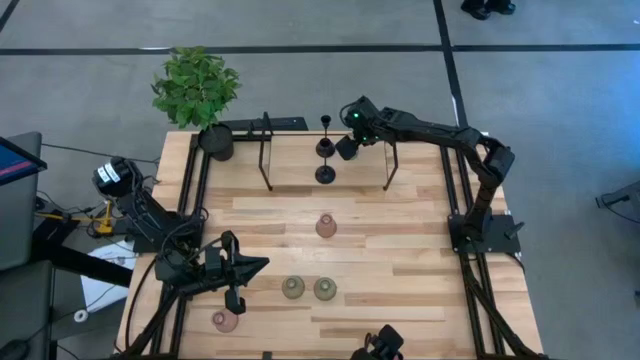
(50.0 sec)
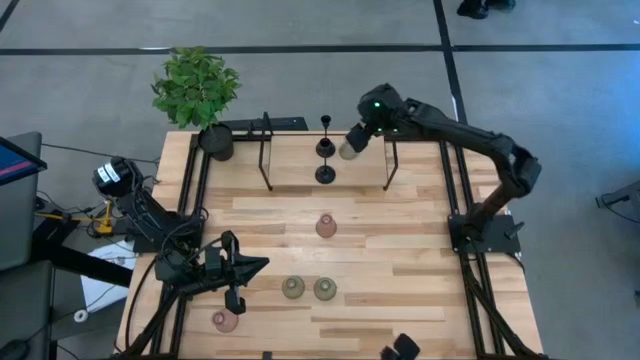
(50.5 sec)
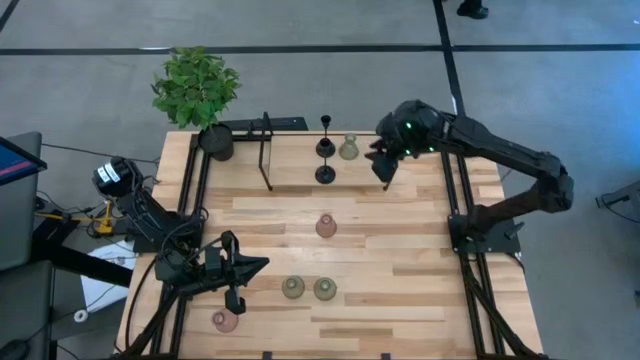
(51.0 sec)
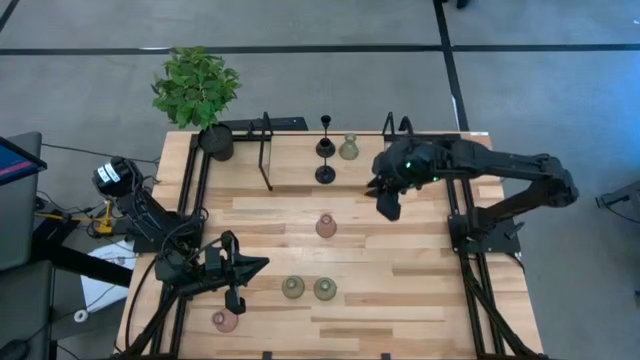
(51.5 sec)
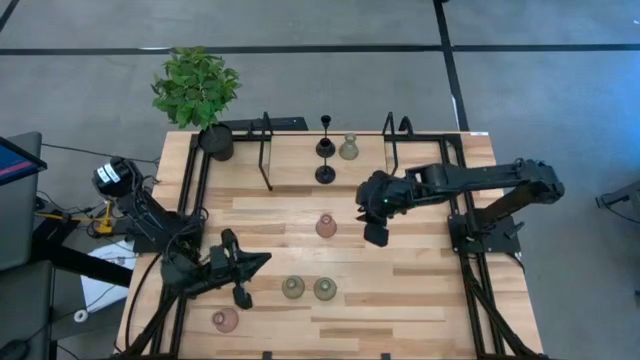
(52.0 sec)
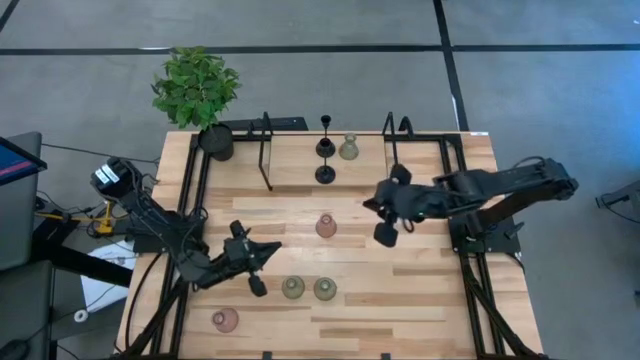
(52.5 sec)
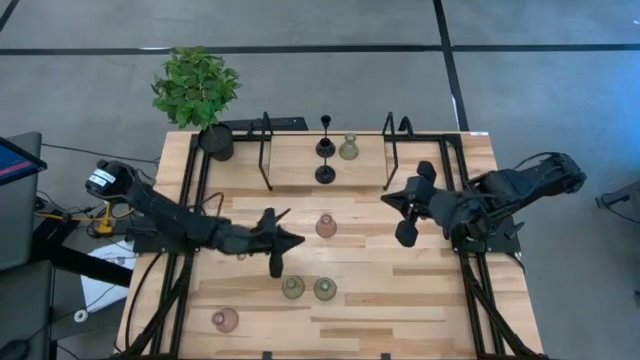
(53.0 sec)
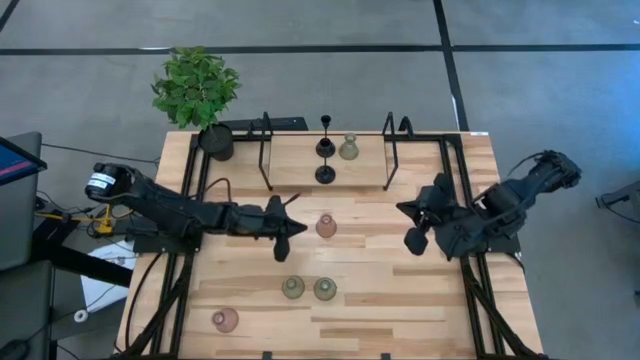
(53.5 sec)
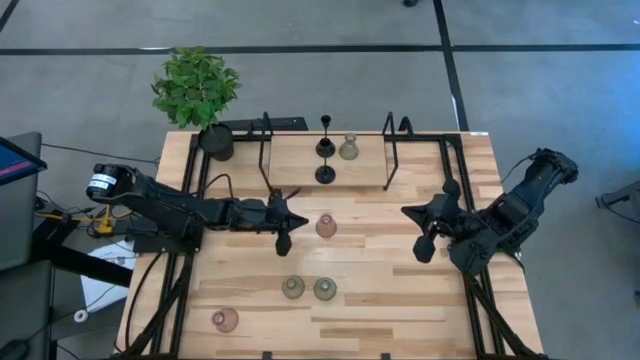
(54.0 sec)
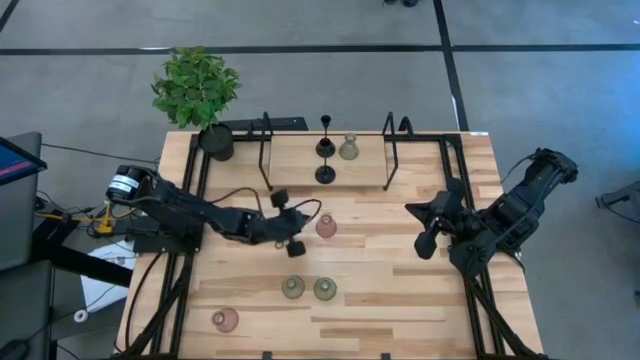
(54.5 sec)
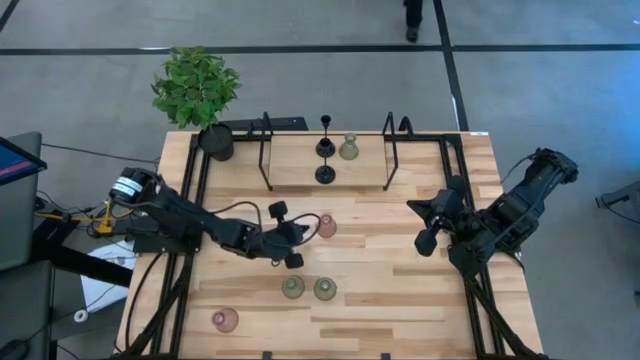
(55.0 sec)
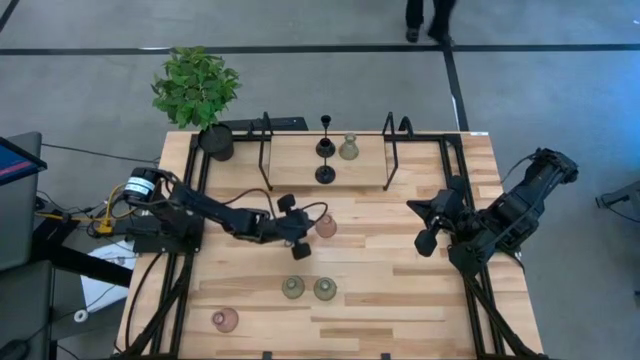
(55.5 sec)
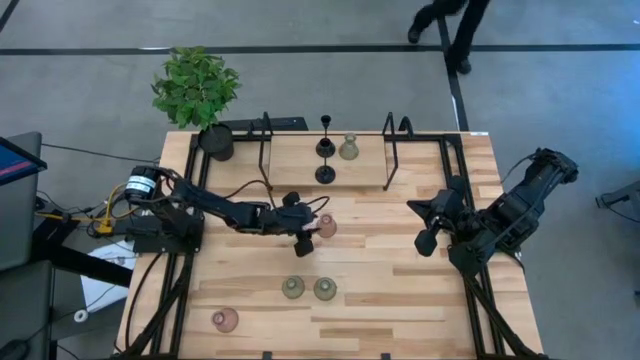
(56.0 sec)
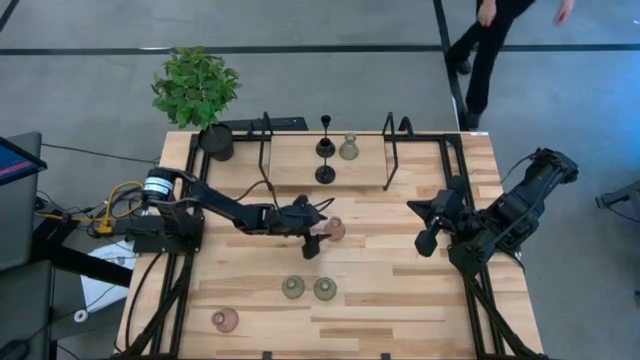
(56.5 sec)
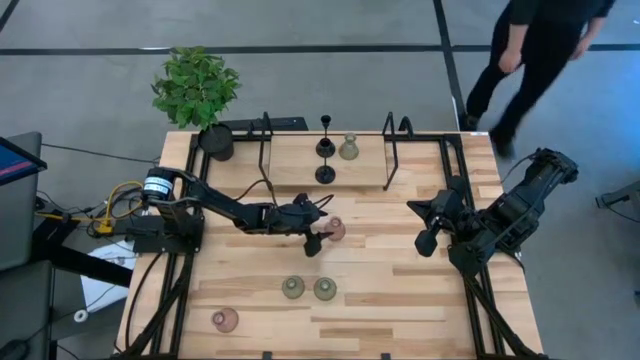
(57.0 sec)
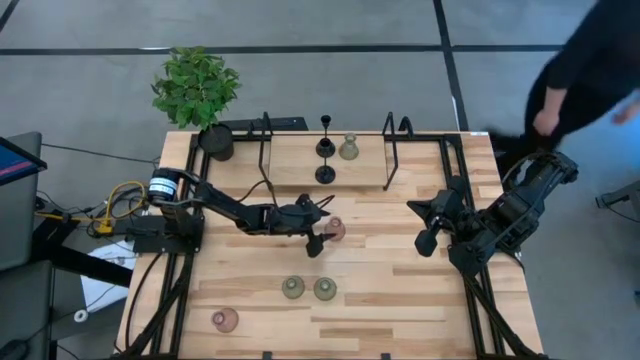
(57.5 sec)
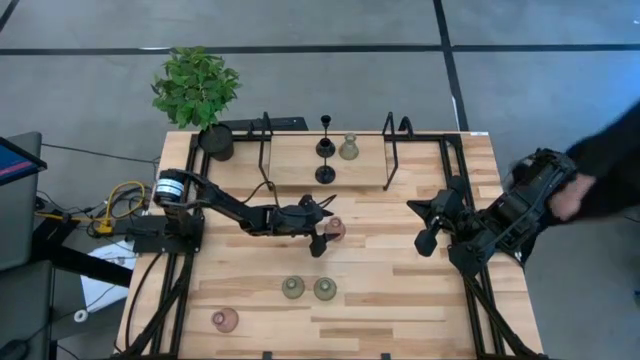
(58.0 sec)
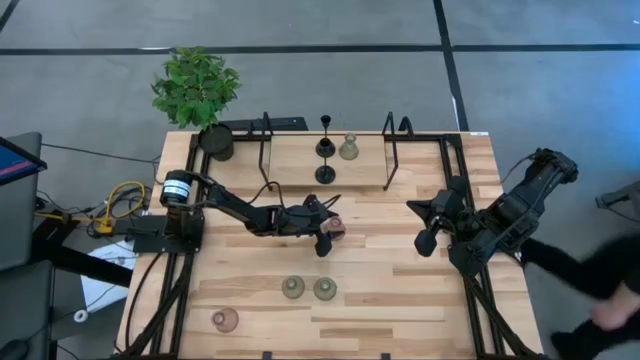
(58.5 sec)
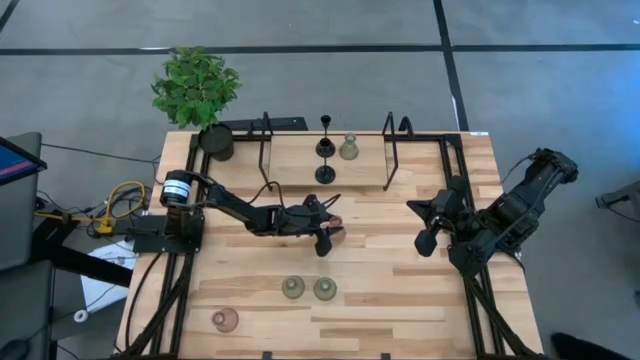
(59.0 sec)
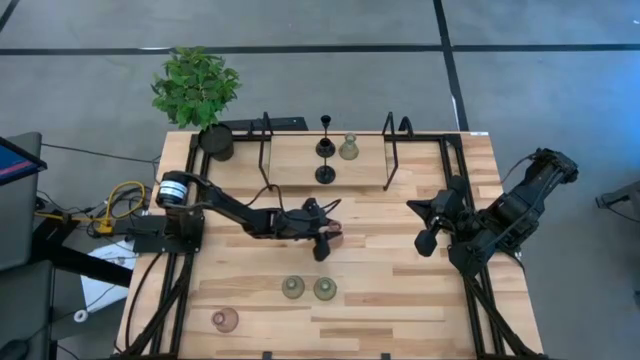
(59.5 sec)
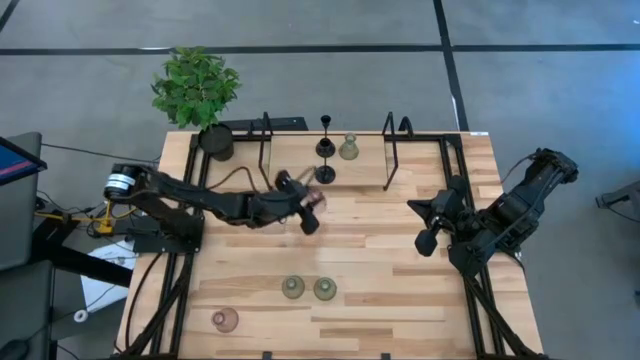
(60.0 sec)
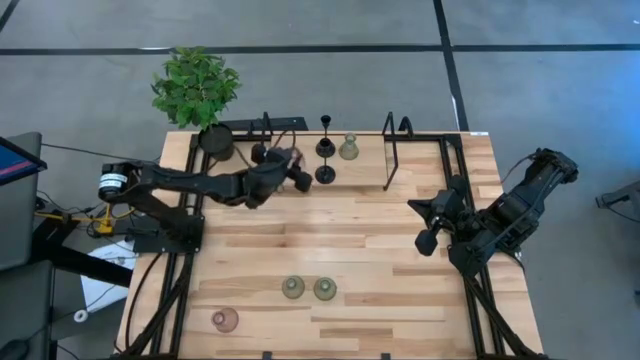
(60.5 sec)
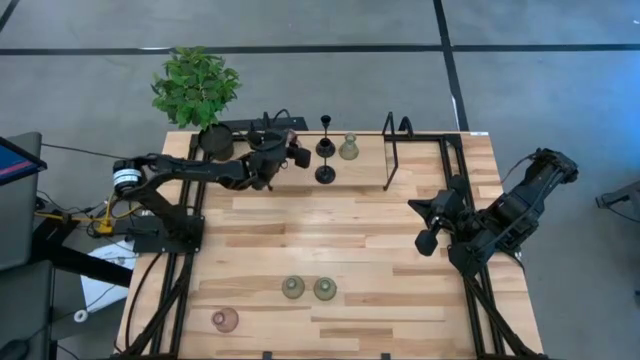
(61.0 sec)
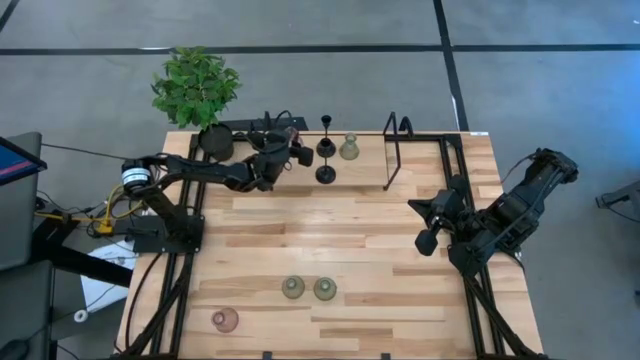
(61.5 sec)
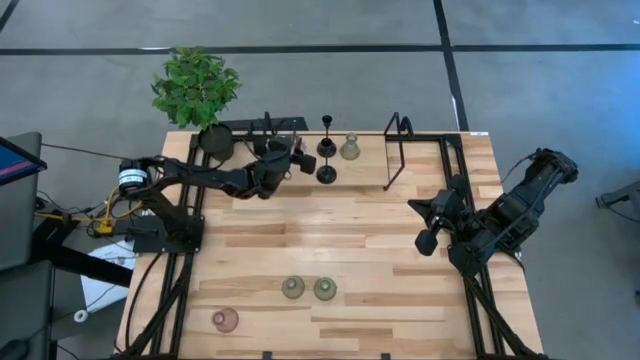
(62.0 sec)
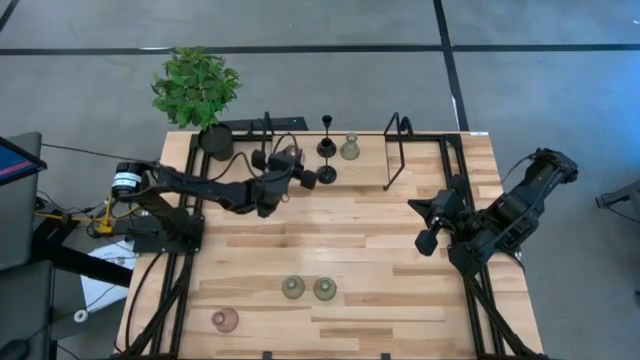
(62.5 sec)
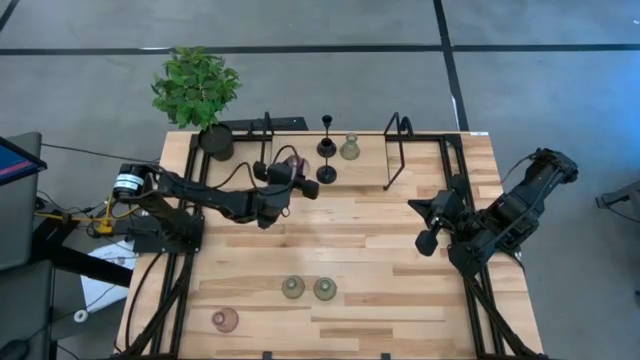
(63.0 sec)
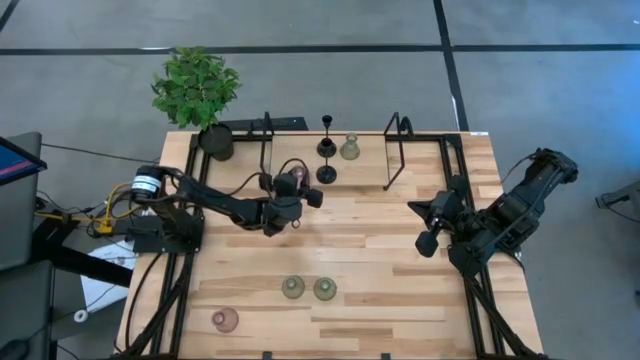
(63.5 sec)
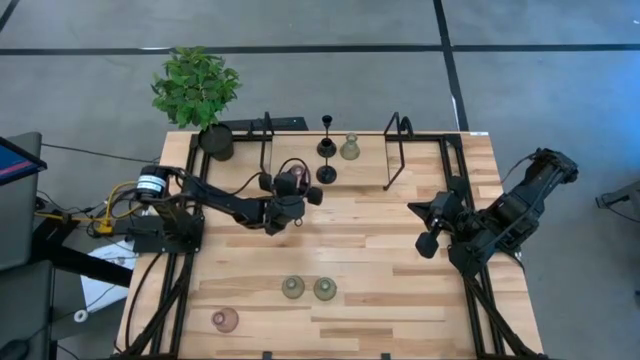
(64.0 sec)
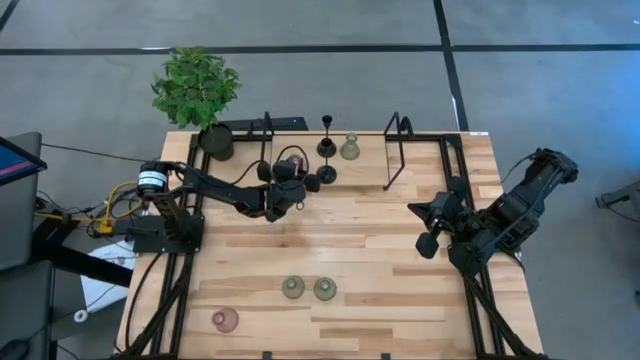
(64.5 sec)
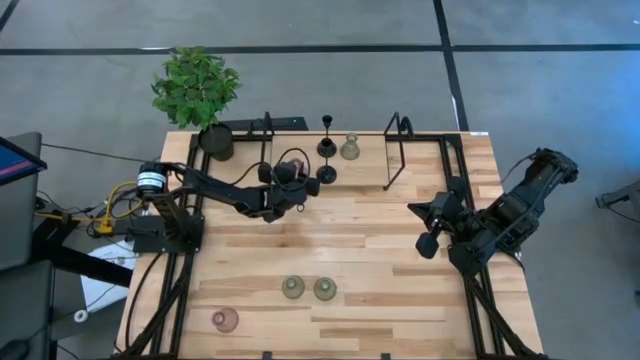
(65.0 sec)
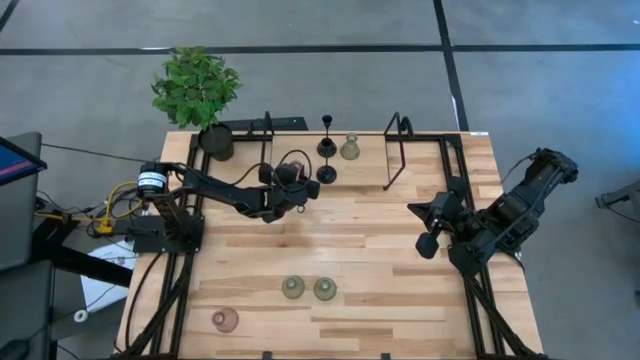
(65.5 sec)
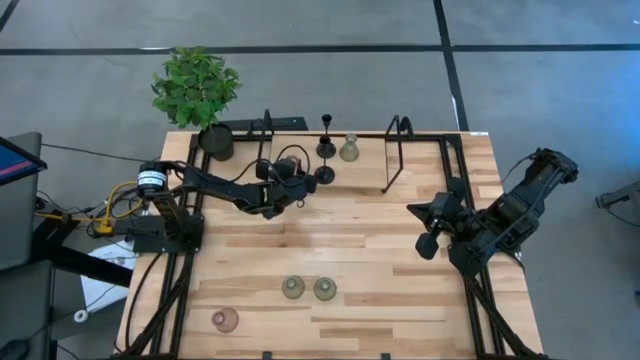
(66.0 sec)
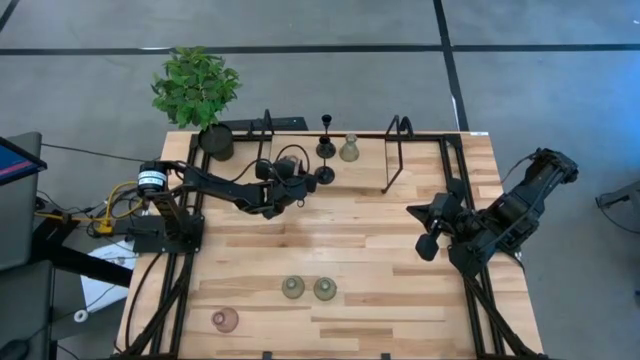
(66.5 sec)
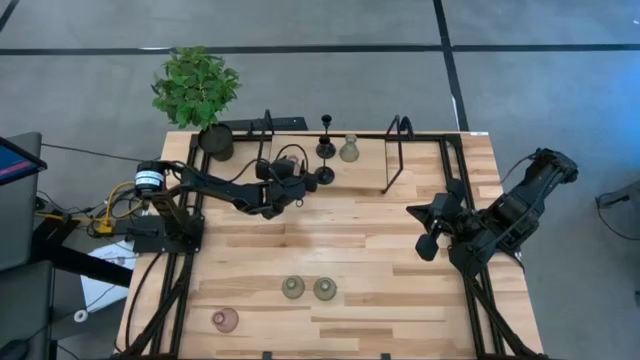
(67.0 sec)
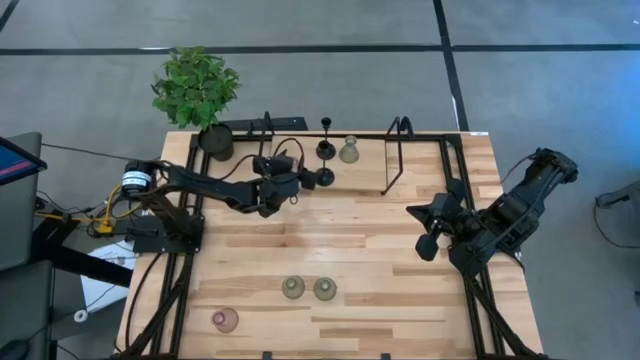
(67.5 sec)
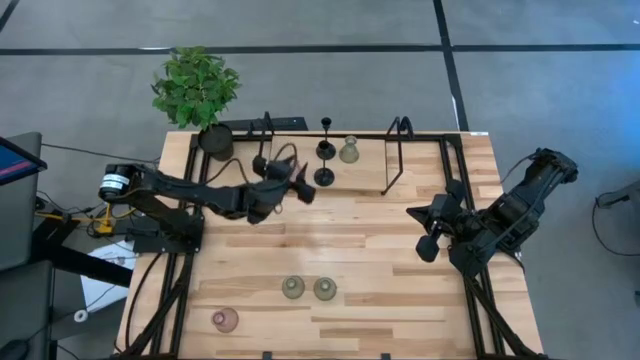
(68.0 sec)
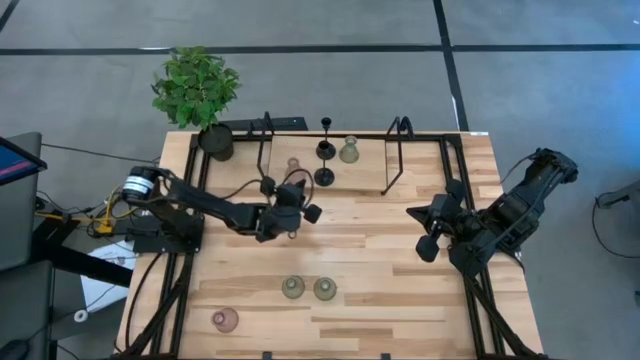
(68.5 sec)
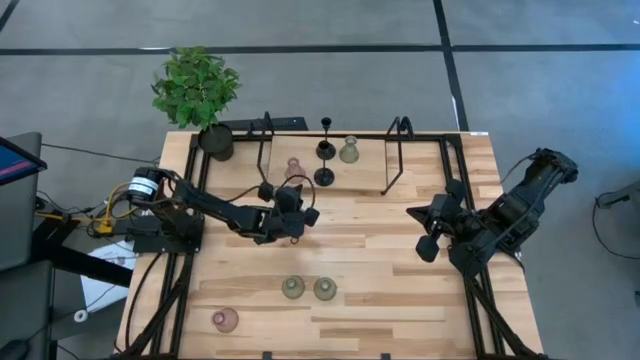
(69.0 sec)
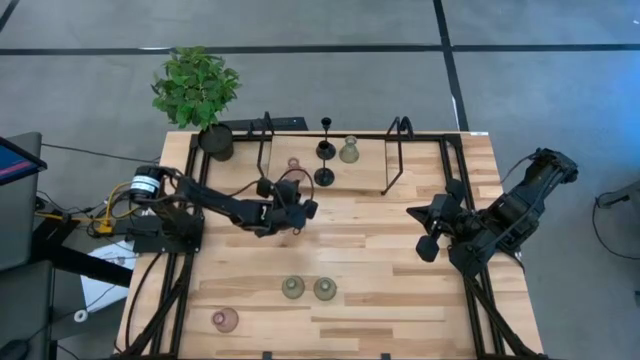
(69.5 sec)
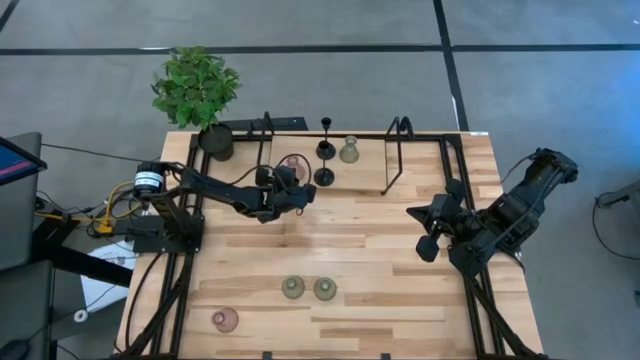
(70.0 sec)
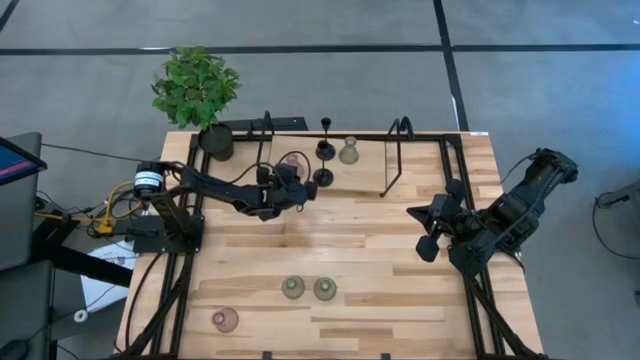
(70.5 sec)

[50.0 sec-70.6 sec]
Task: Pick & Place candle stick holders
Put the pink candle holder on the shelf
